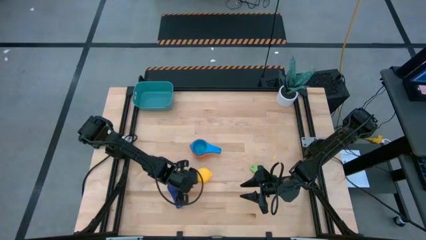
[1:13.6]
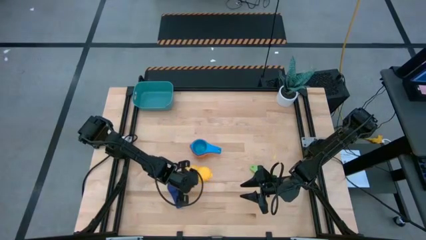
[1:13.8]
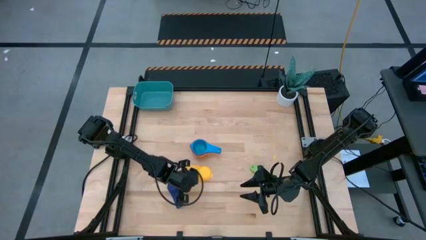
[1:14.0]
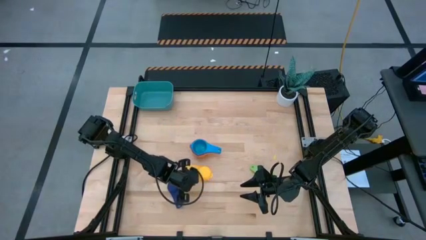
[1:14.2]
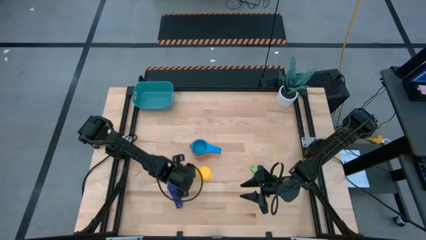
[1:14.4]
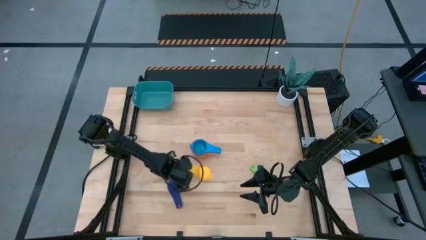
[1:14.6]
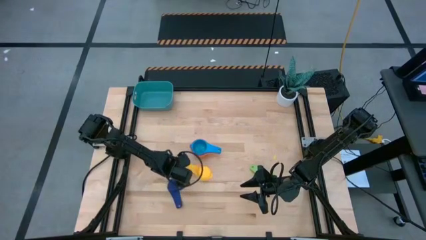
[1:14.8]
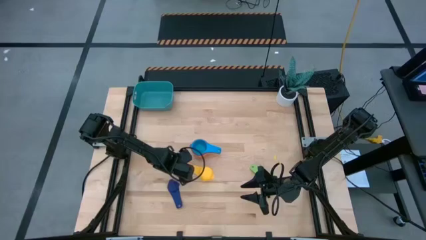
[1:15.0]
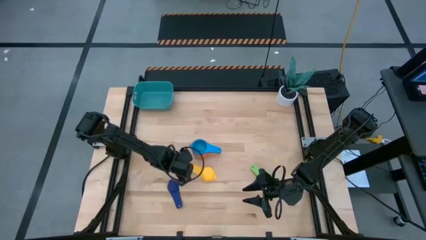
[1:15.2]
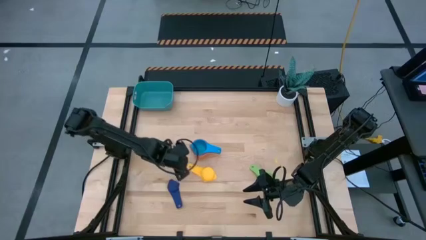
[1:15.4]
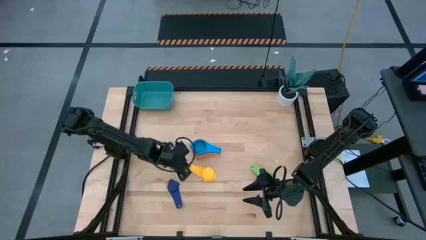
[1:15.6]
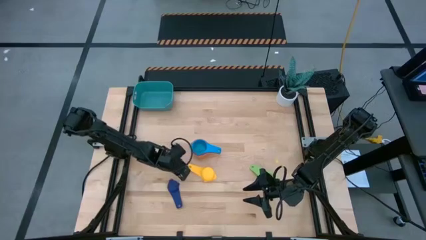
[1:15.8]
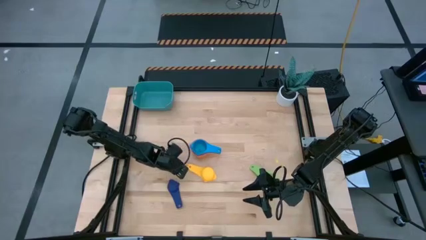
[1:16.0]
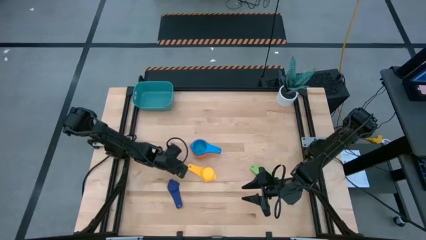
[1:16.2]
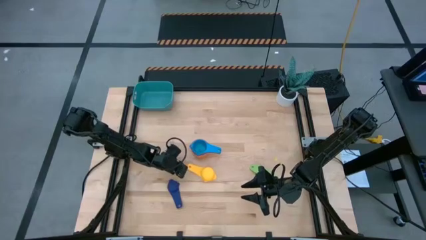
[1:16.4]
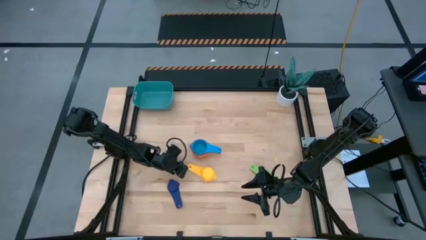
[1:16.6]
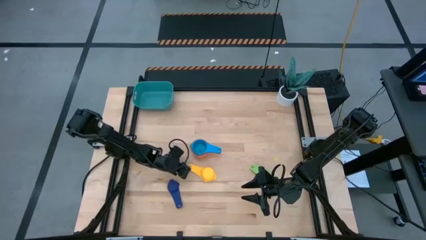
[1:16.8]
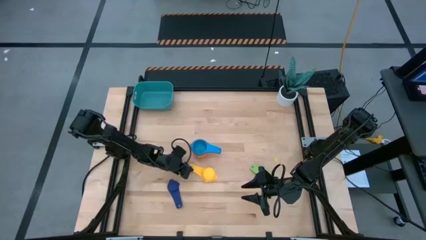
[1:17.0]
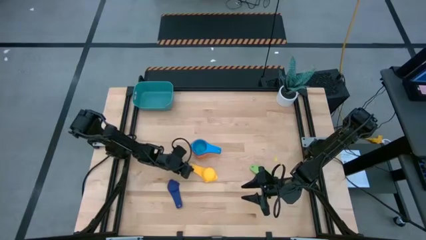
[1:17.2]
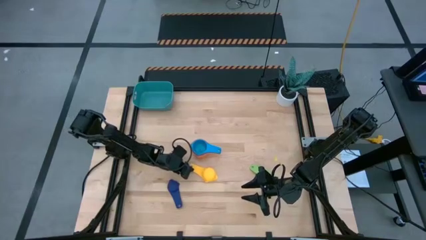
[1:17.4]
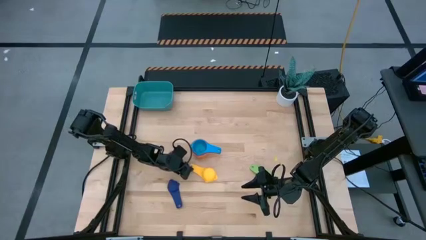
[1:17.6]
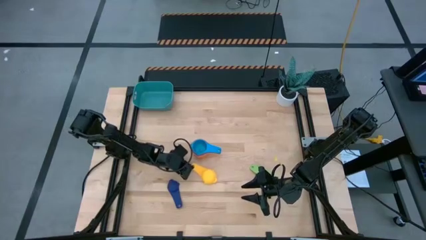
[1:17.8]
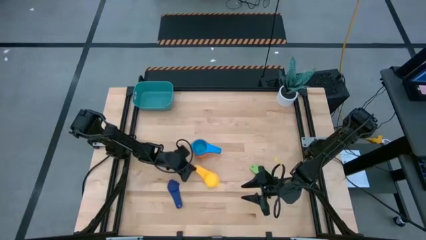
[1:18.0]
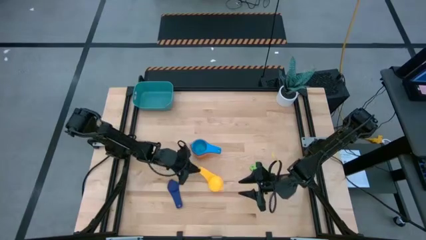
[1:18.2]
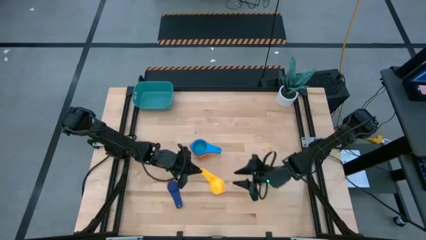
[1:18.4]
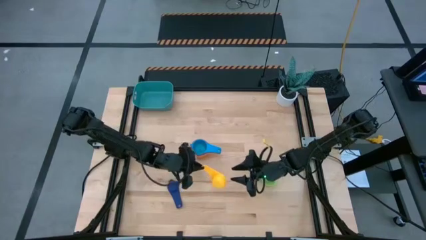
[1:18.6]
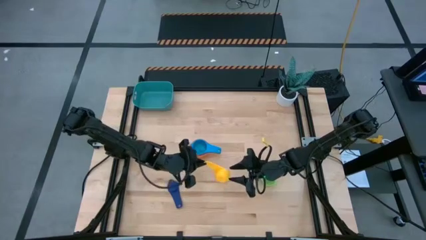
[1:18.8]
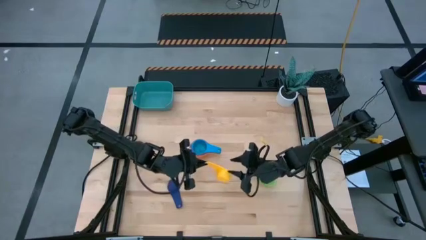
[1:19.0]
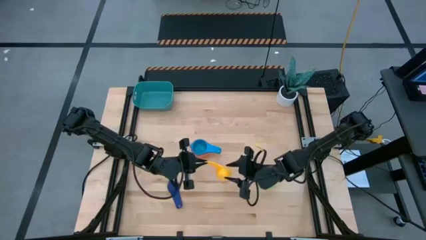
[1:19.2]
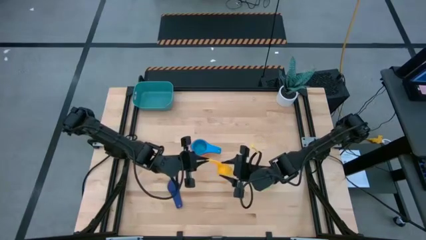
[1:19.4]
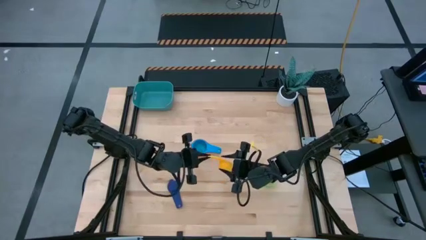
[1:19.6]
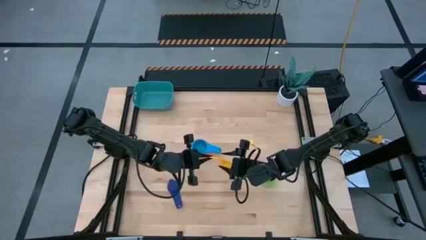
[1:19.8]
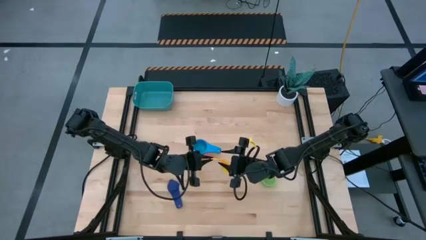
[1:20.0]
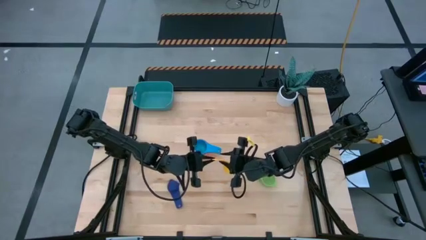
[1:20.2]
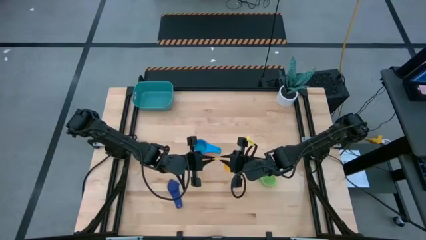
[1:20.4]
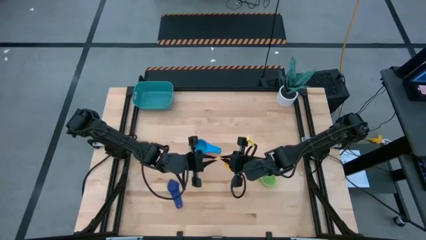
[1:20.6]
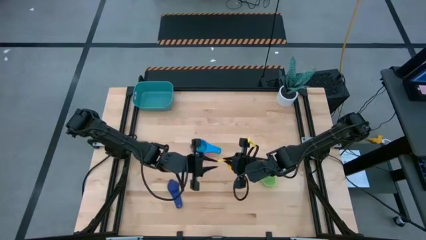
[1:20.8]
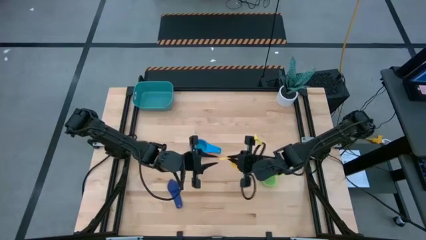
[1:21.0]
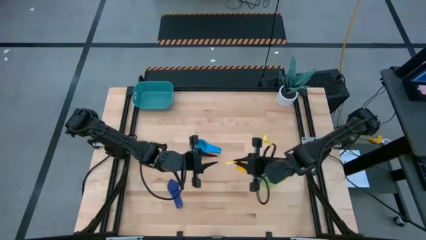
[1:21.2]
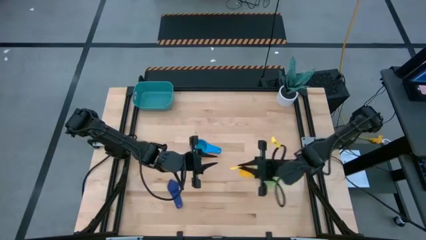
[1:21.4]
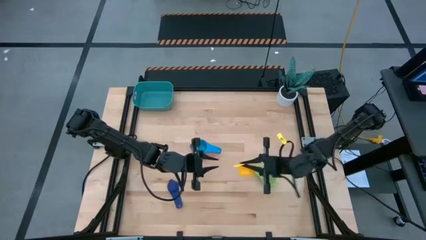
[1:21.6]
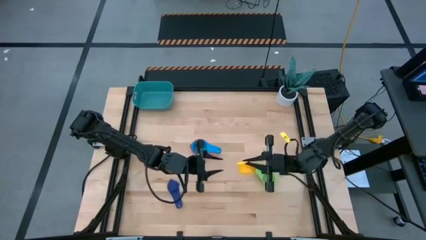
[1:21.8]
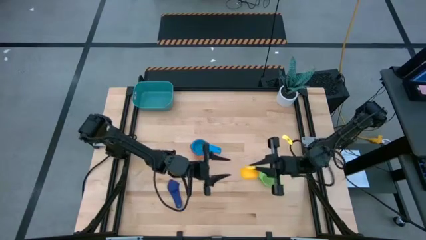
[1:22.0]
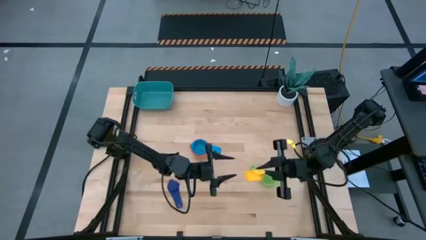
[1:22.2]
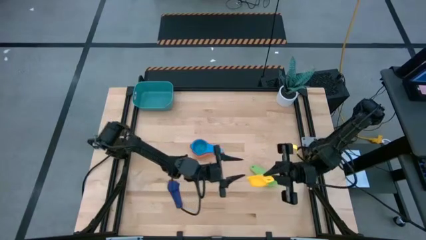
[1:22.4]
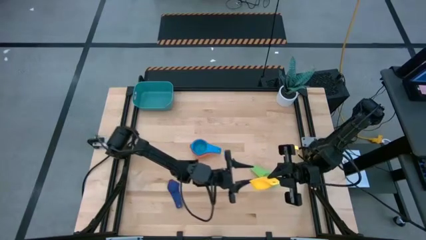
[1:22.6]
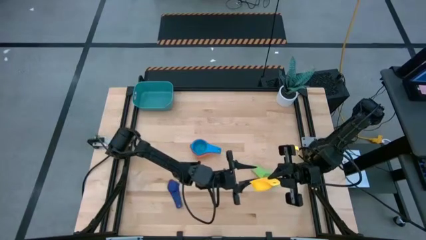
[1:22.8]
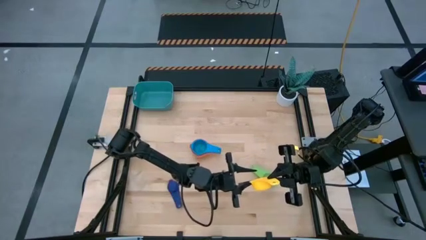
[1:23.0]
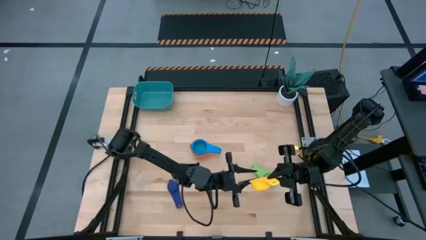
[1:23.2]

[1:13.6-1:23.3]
Task: Nest measuring cups in basket
Stack the yellow measuring cup on top of the light blue measuring cup

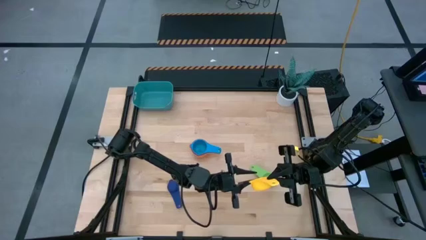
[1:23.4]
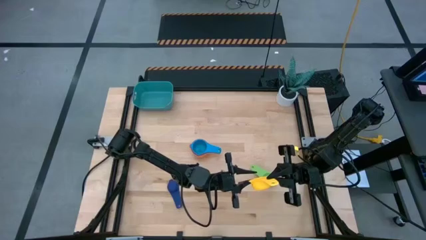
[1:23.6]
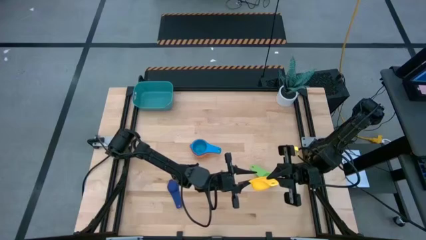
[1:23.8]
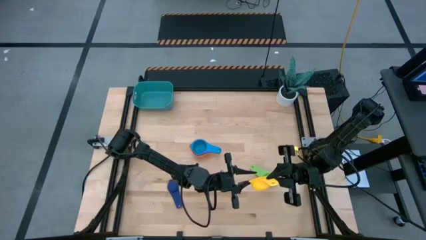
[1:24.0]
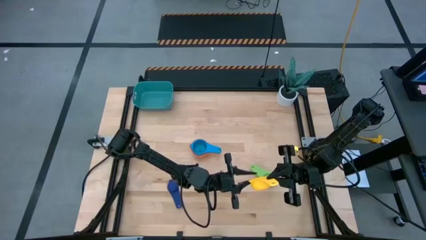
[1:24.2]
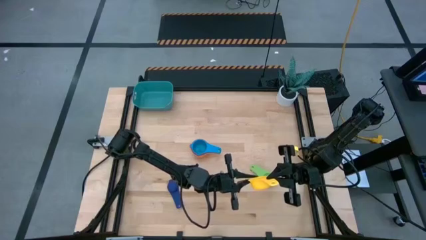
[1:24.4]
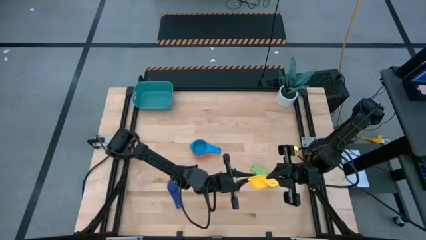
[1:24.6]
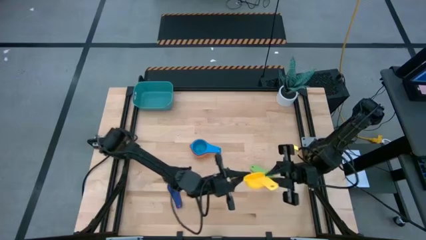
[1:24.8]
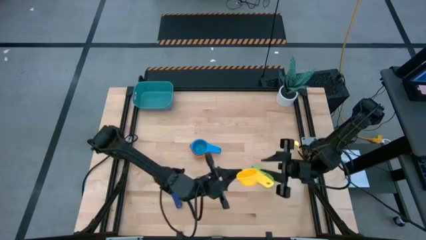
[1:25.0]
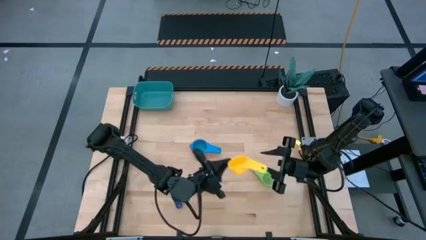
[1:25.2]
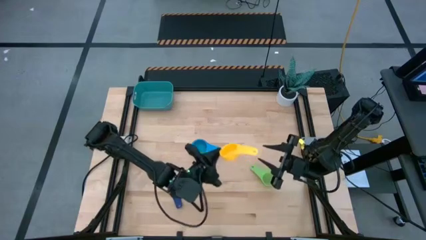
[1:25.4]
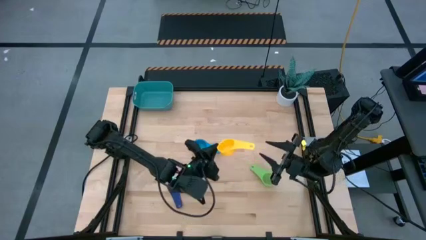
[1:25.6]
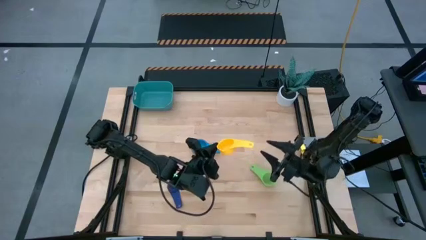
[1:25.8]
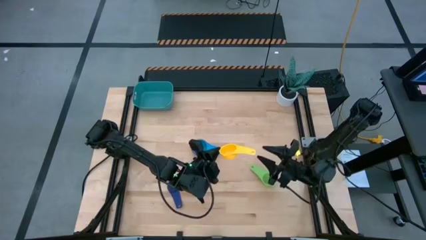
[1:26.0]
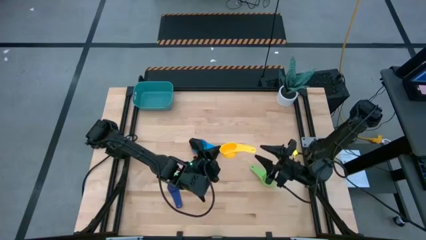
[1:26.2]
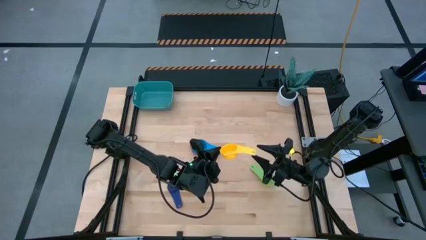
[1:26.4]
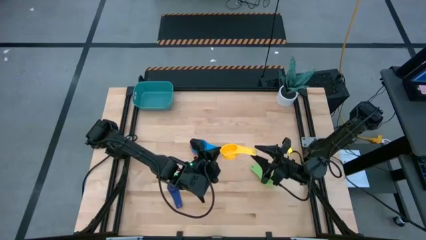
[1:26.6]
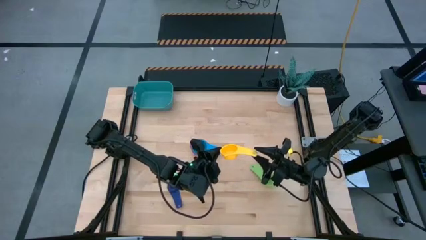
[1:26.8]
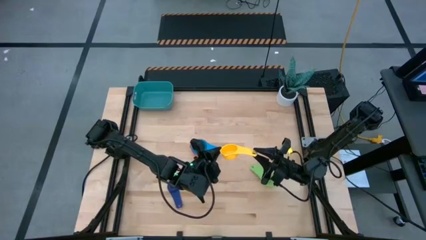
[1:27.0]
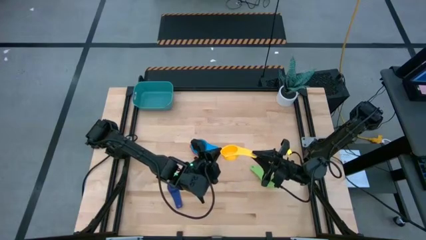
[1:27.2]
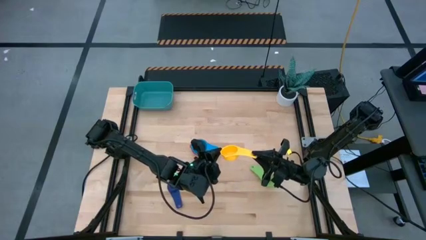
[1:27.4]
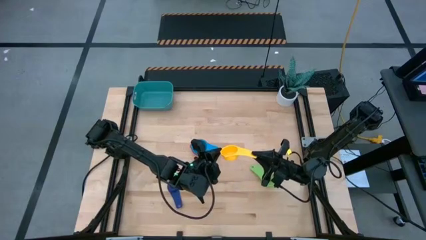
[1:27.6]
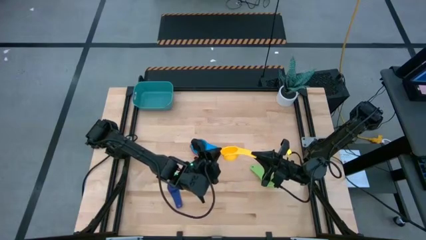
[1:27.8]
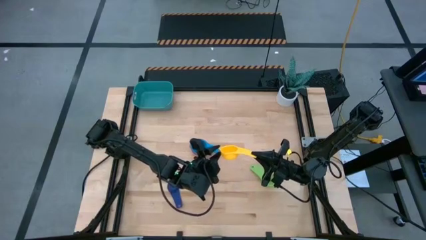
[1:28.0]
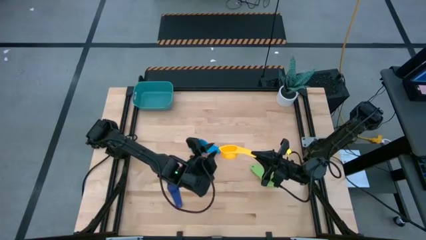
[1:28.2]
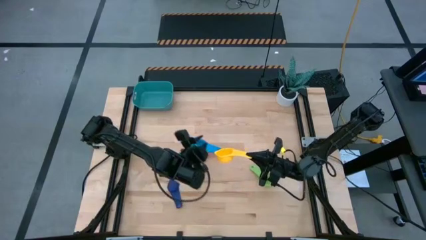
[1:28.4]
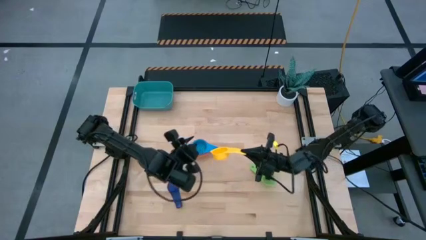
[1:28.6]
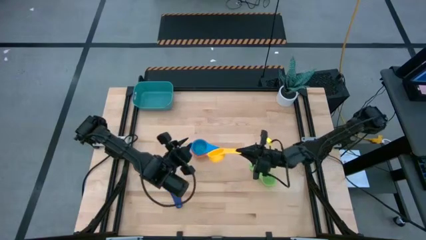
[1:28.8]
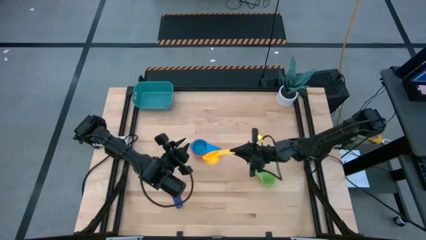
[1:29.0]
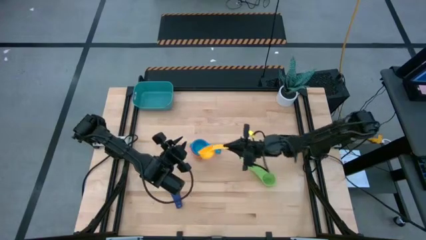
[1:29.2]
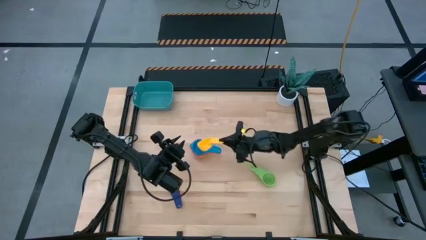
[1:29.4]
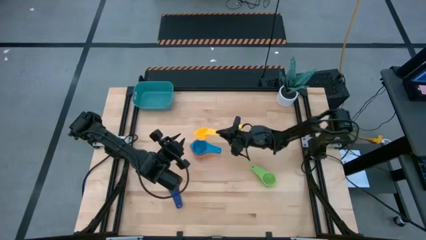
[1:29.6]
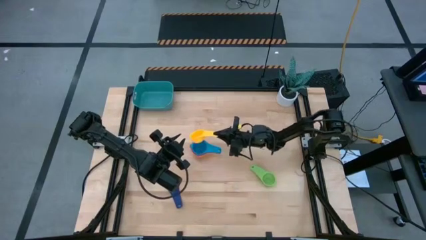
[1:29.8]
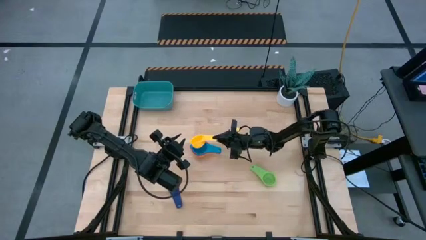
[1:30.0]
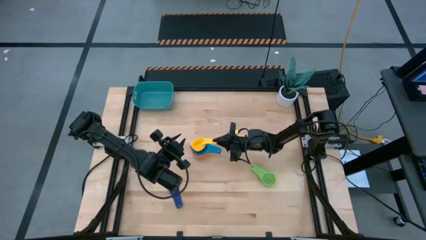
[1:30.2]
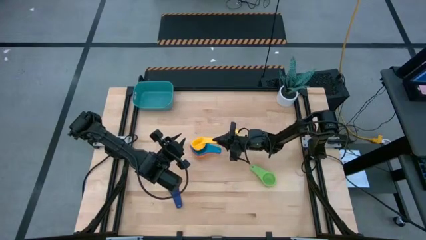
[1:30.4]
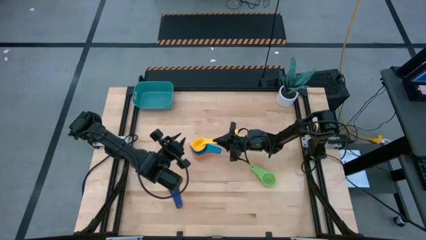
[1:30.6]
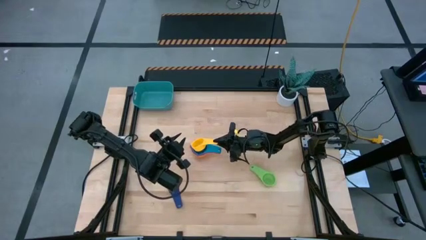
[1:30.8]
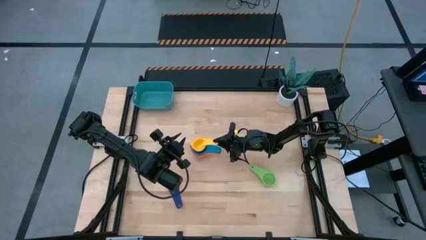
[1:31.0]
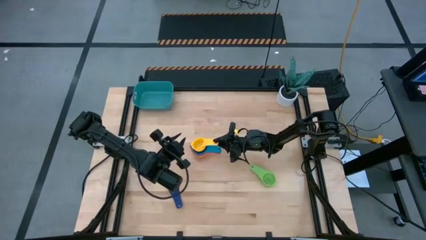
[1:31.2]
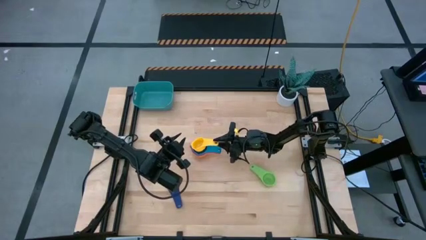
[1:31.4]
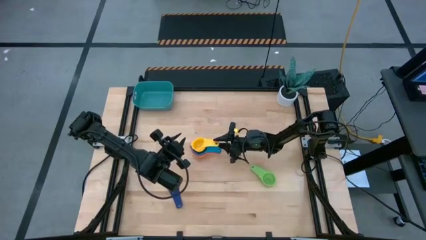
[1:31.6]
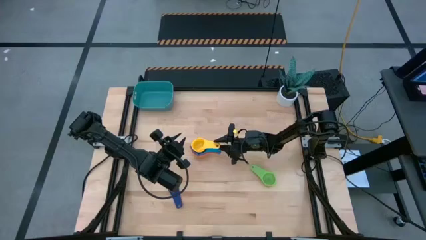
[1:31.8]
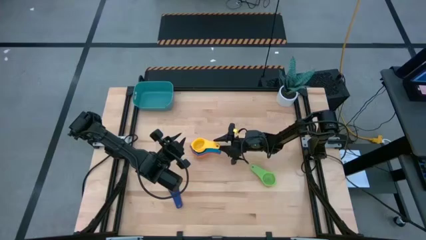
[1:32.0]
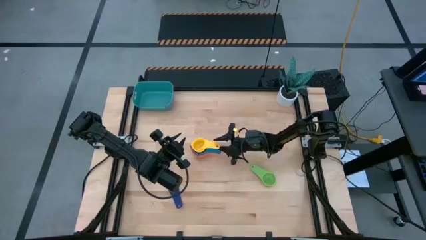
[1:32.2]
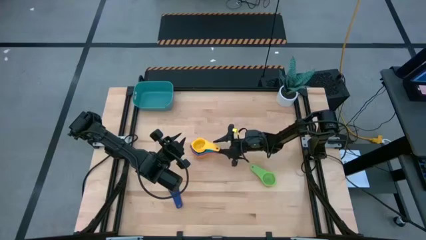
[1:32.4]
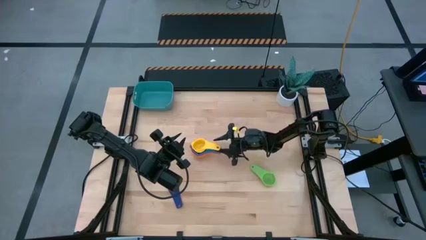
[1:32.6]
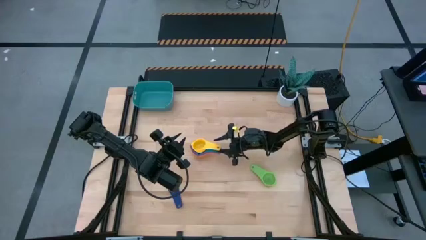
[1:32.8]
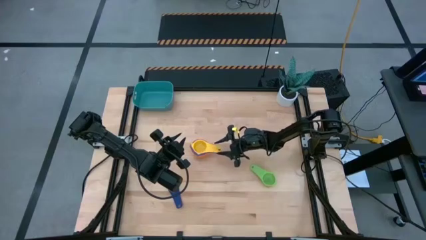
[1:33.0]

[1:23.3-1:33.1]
Stack the yellow measuring cup on top of the light blue measuring cup
